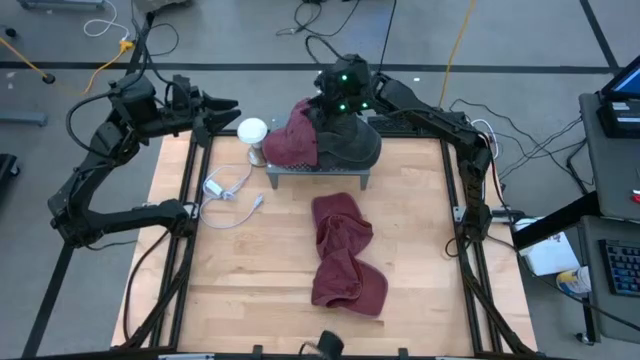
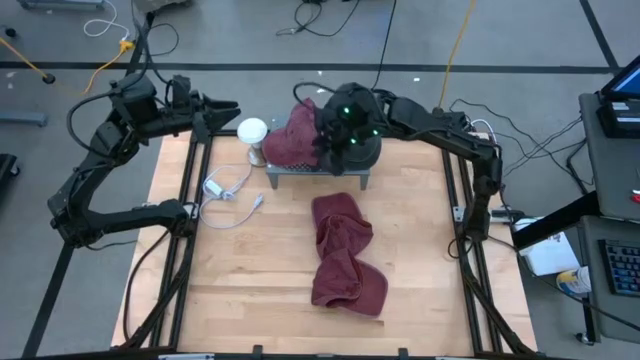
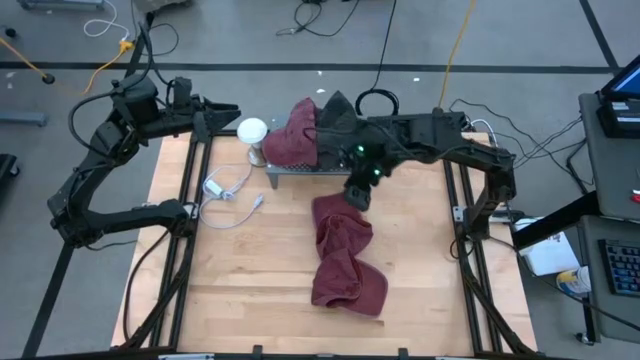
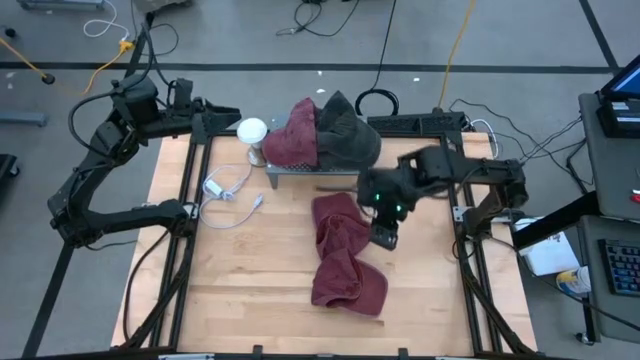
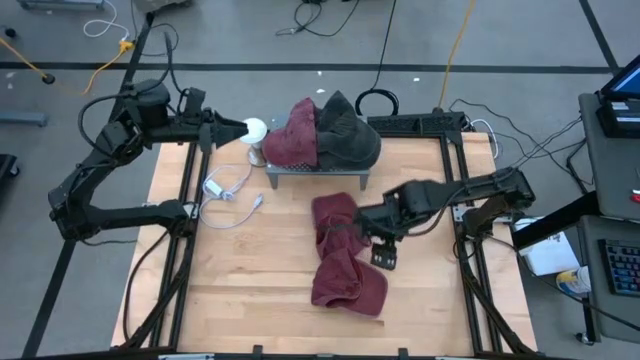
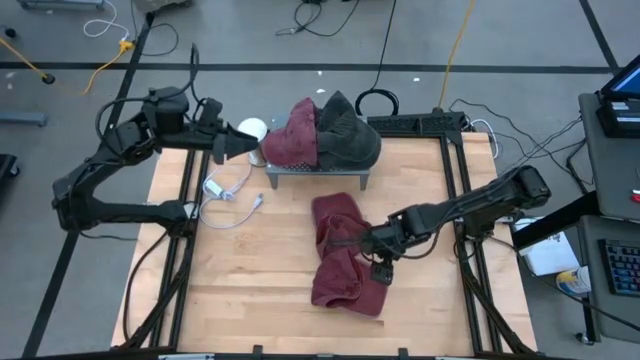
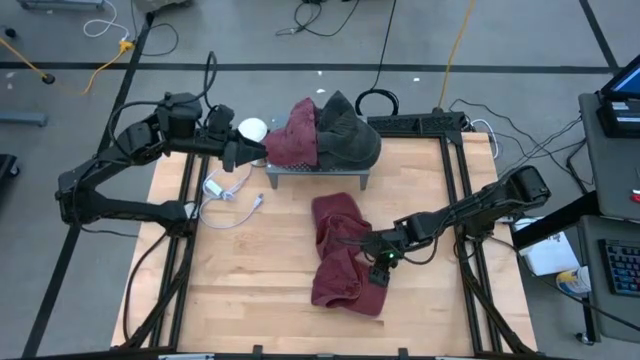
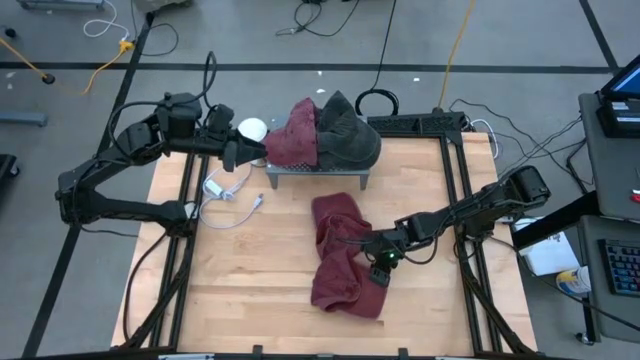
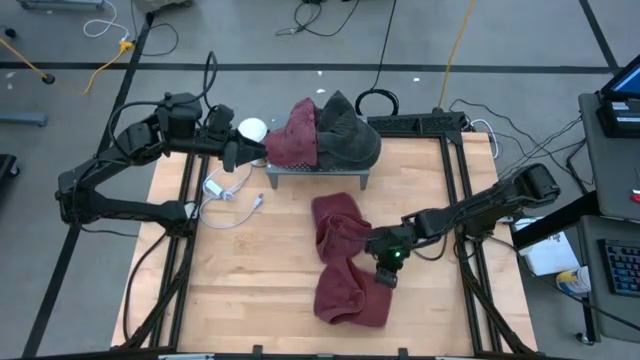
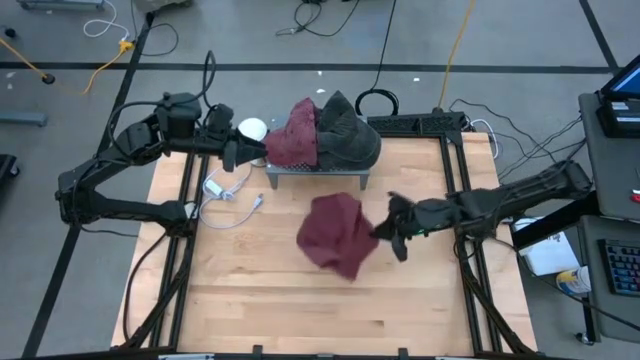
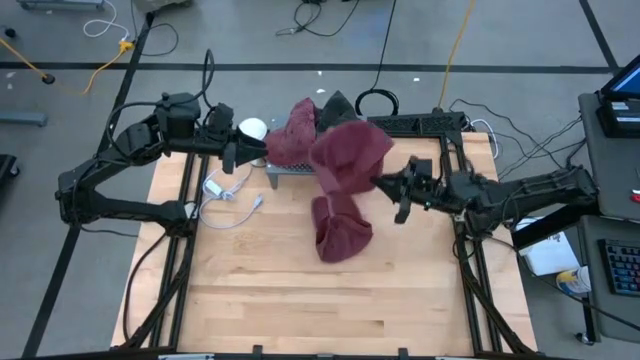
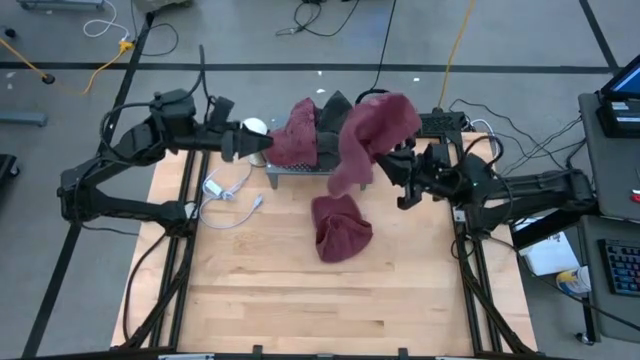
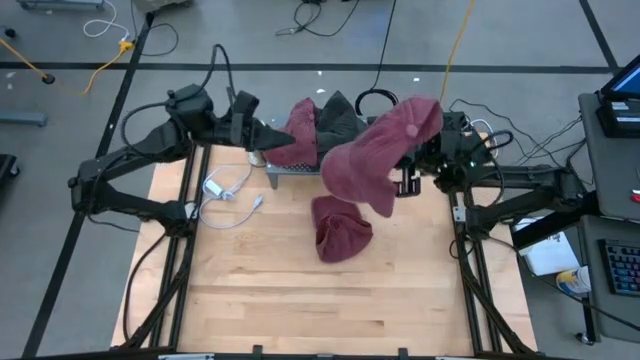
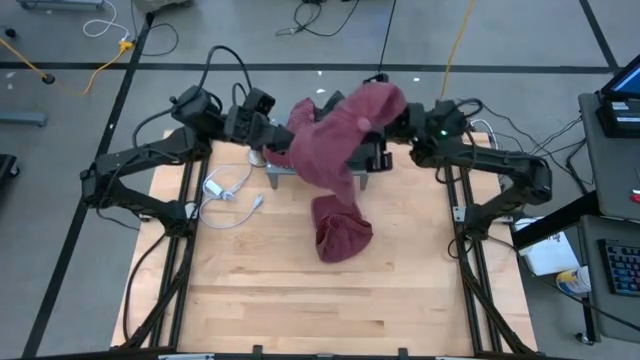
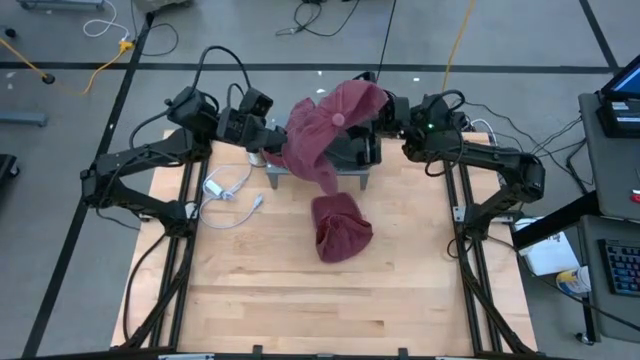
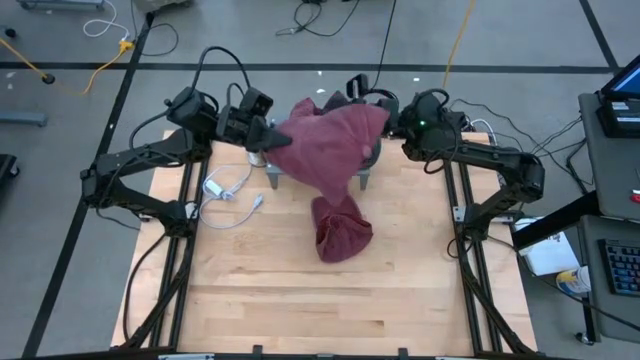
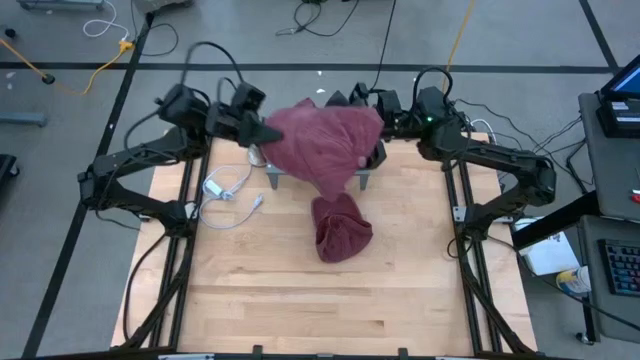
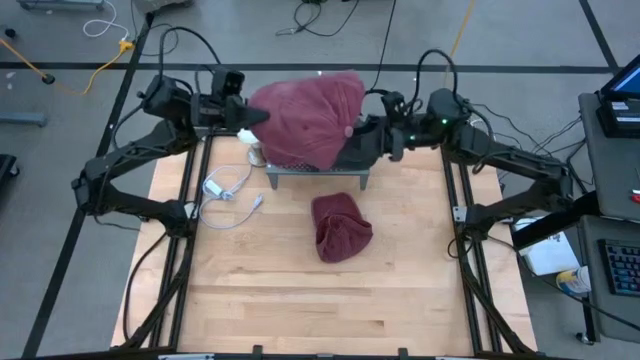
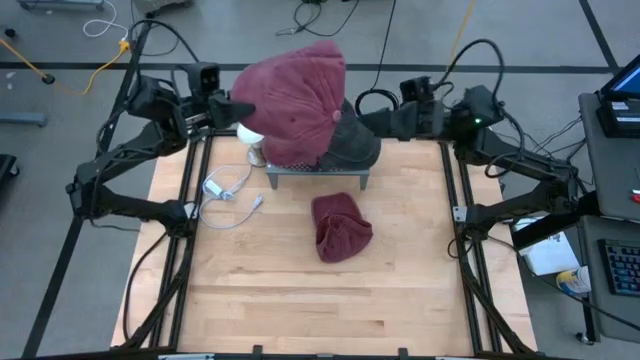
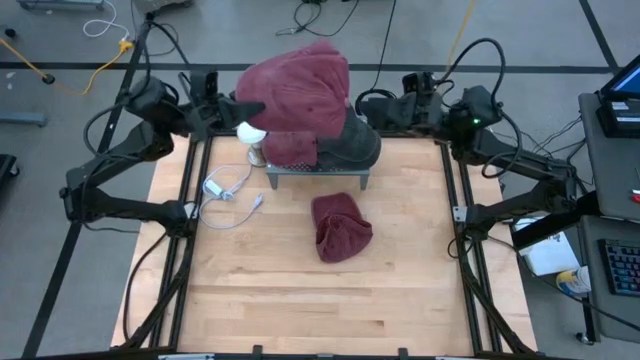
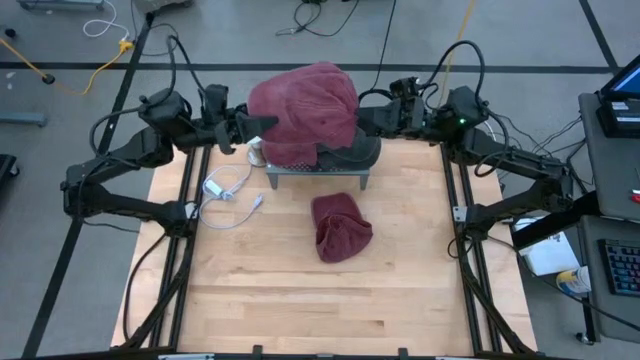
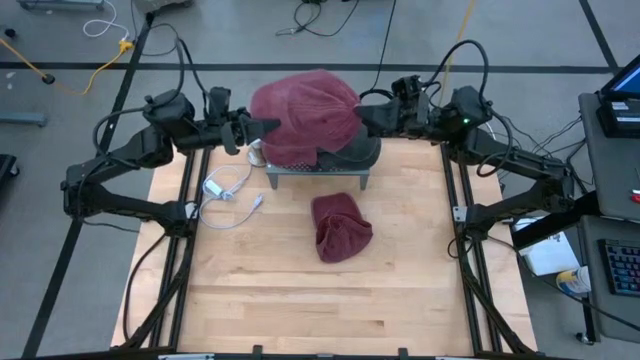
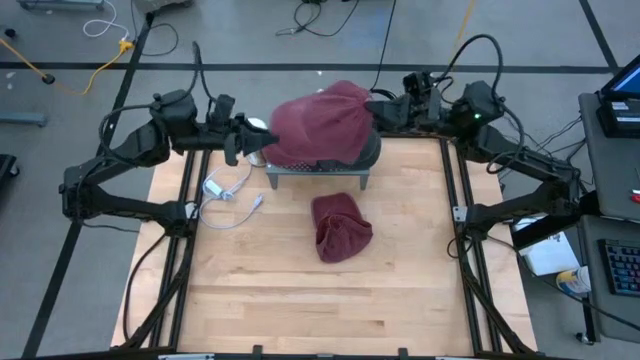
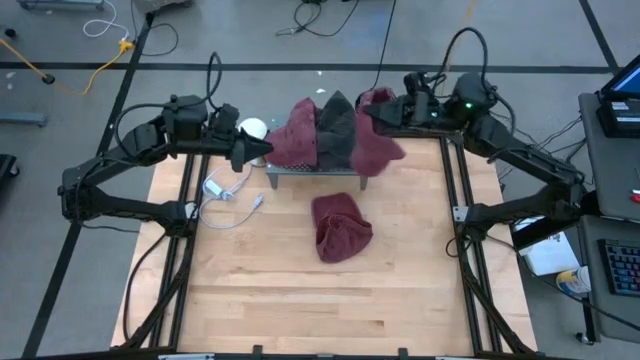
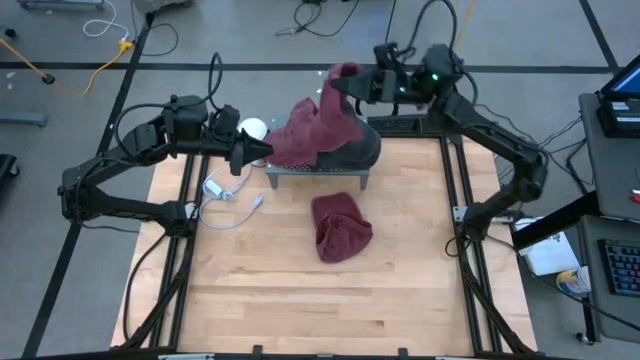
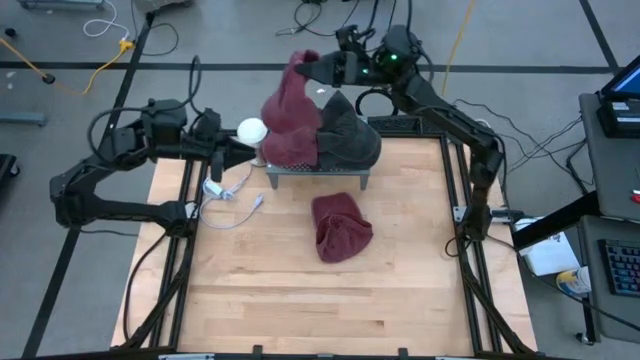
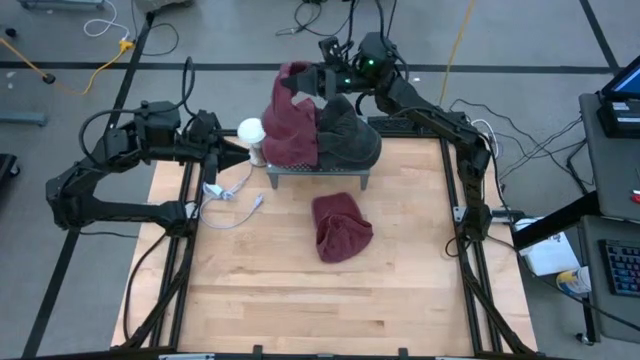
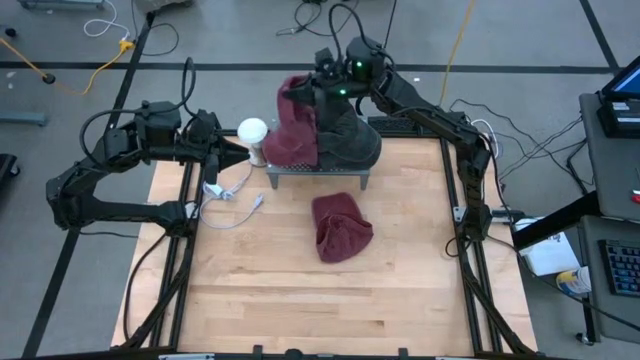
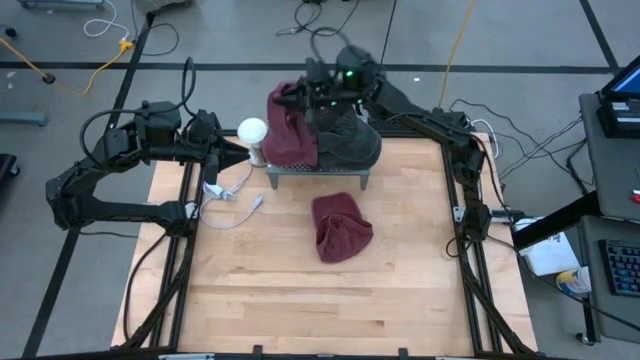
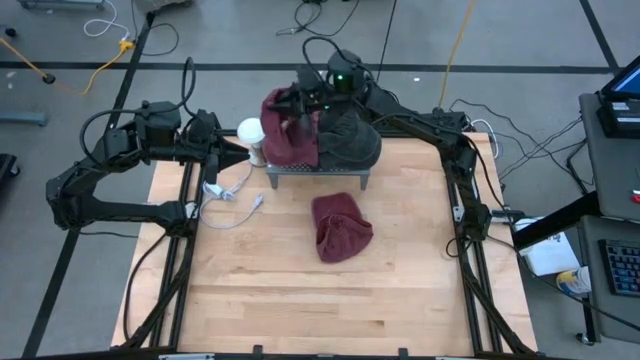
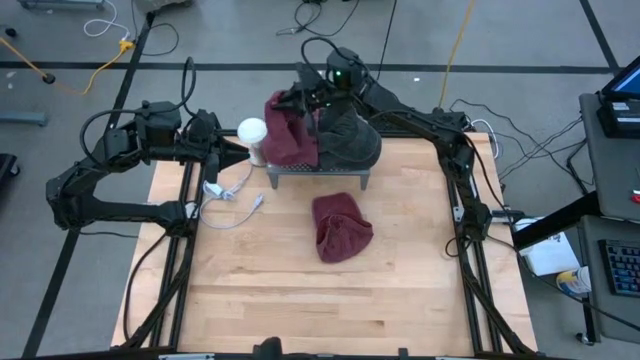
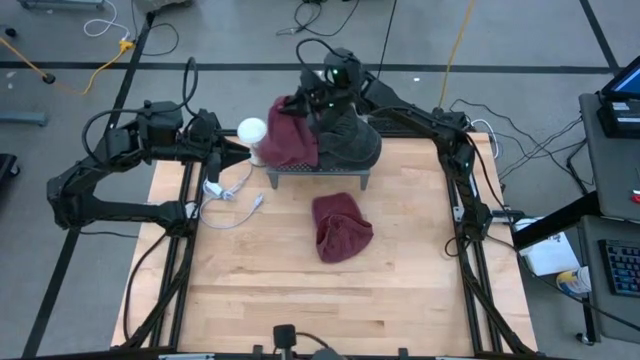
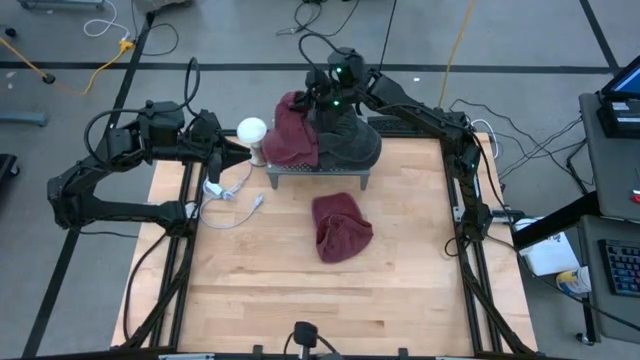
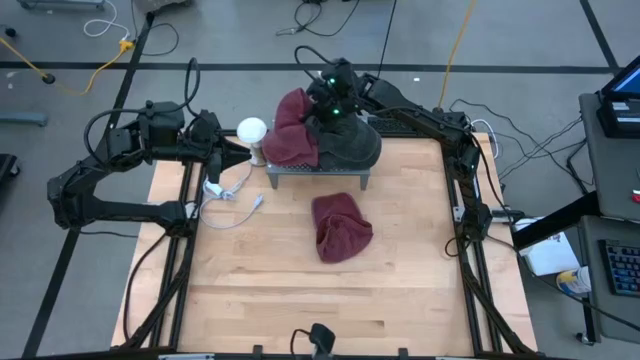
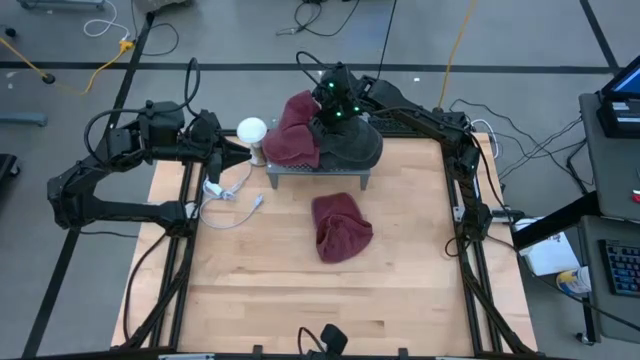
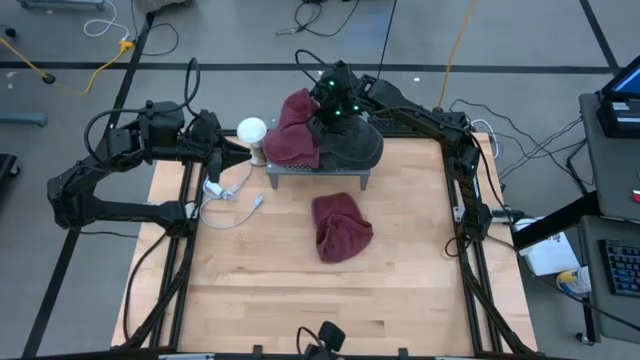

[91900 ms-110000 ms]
Task: Pick & Place hat
Stack the bottom red cap on top of the red cap on the shelf

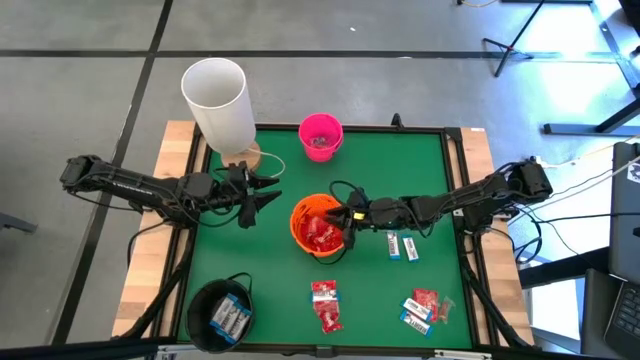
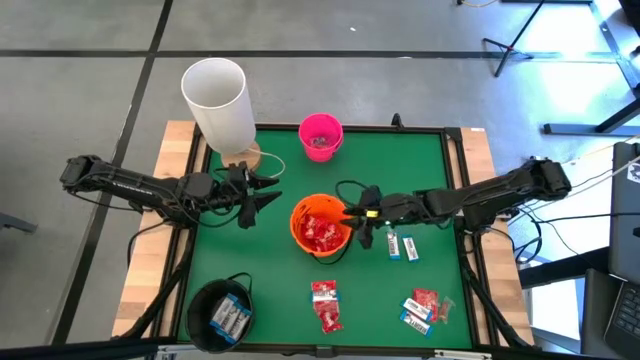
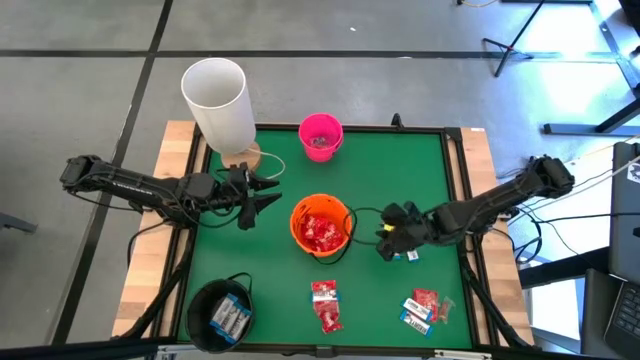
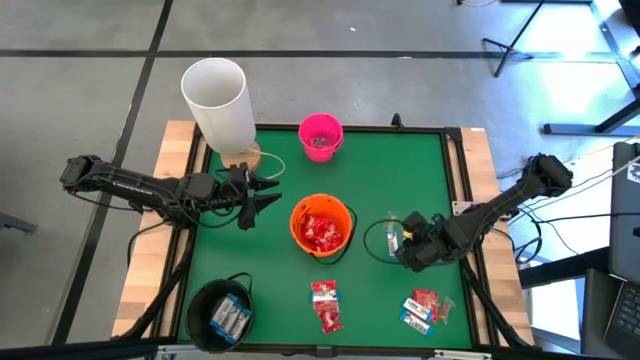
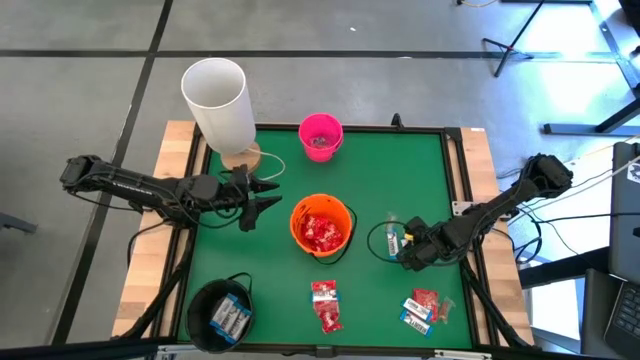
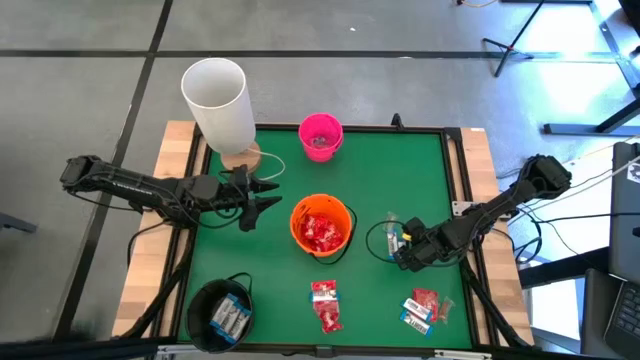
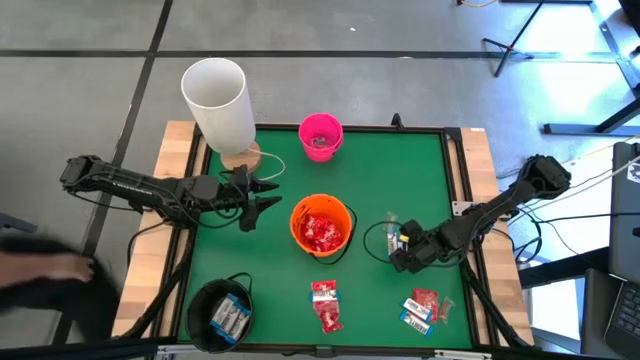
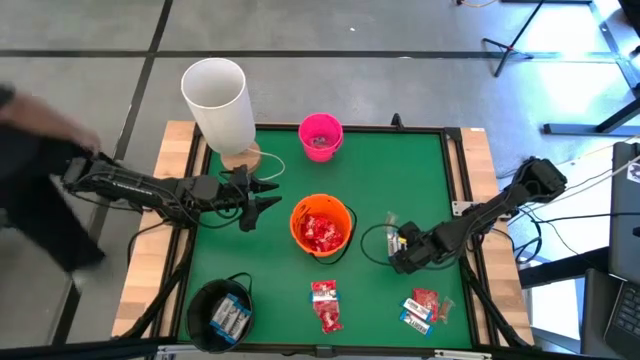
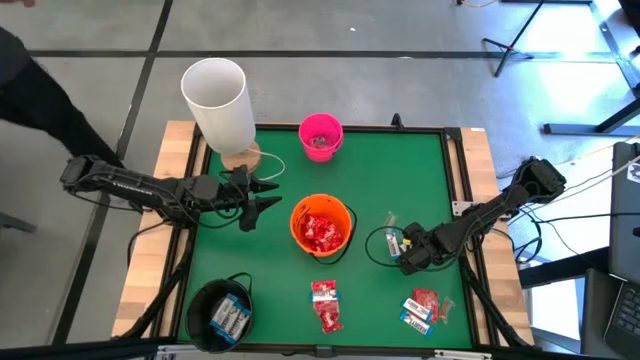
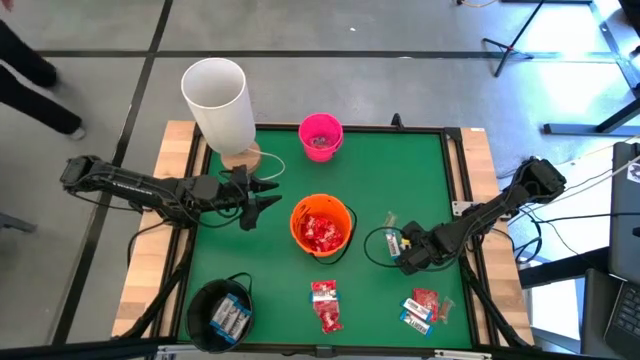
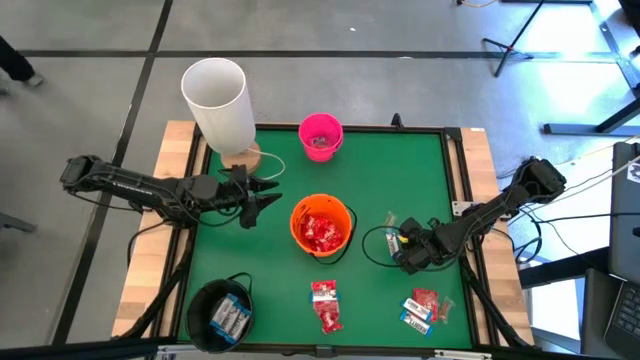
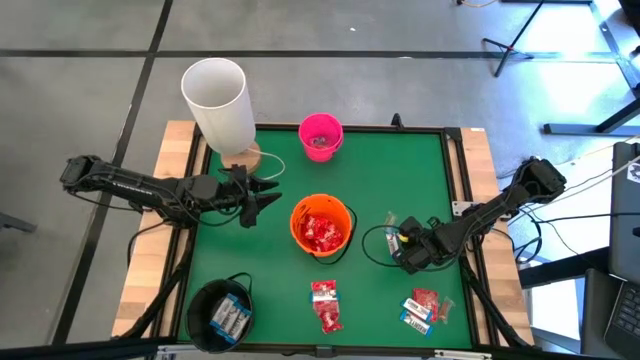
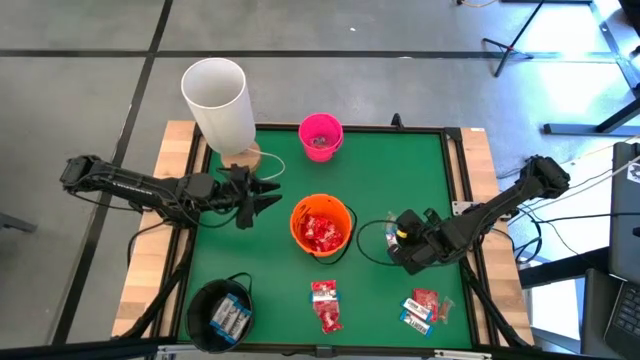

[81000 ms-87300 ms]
Task: Sort candy
Put the white chocolate into the black bucket
